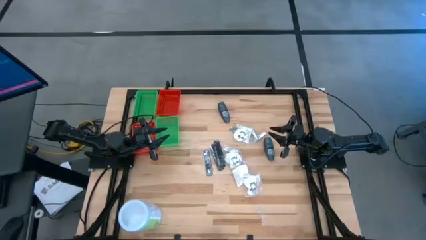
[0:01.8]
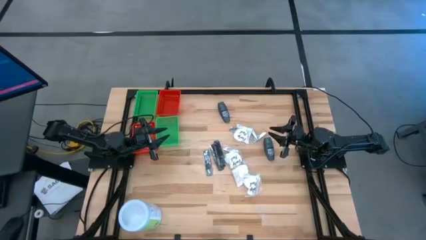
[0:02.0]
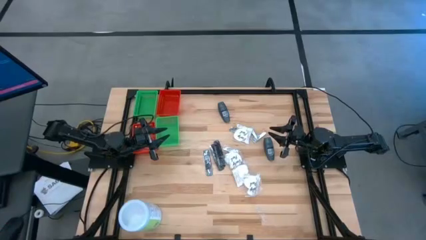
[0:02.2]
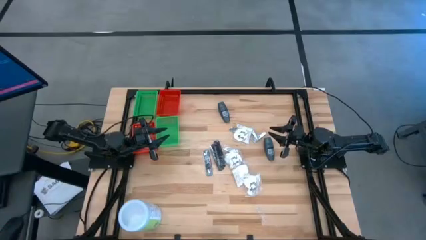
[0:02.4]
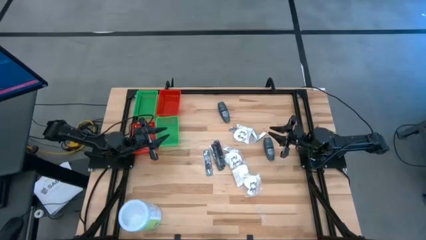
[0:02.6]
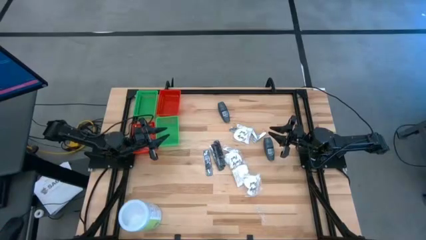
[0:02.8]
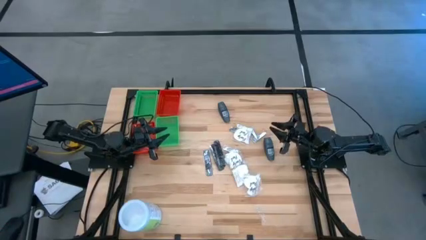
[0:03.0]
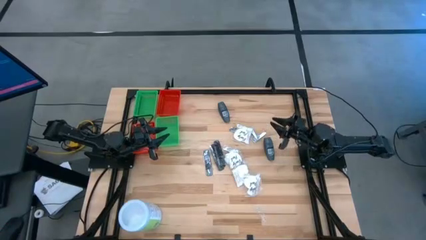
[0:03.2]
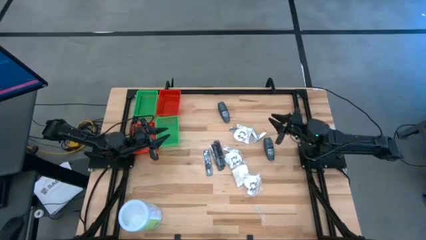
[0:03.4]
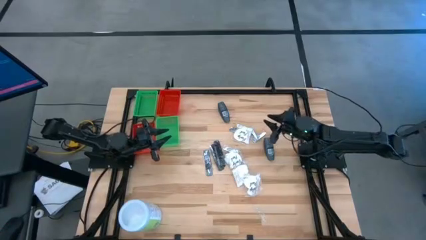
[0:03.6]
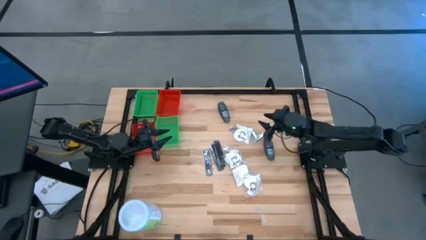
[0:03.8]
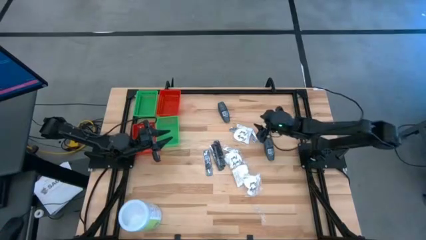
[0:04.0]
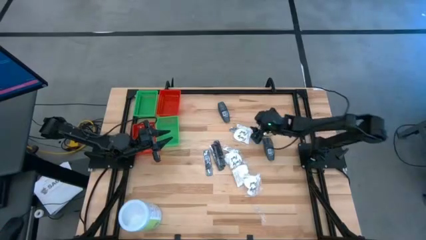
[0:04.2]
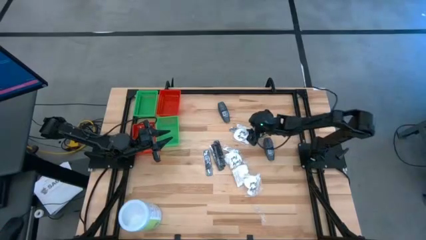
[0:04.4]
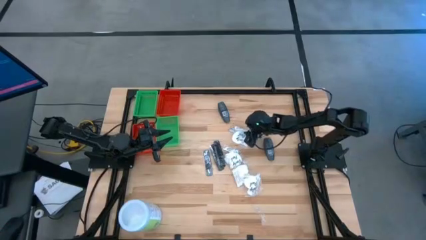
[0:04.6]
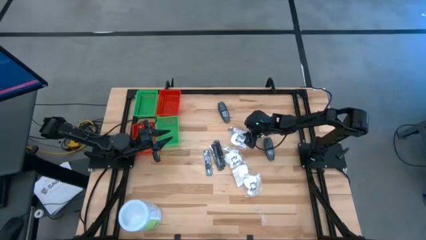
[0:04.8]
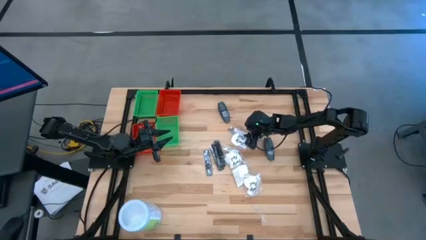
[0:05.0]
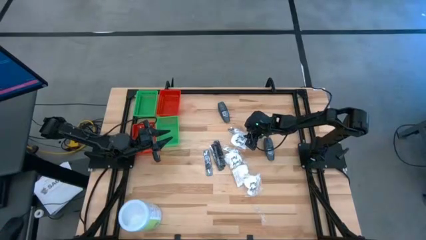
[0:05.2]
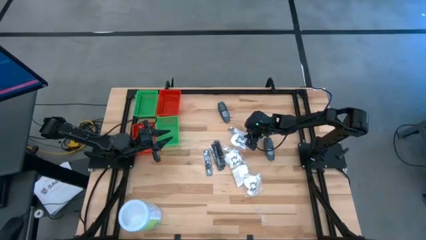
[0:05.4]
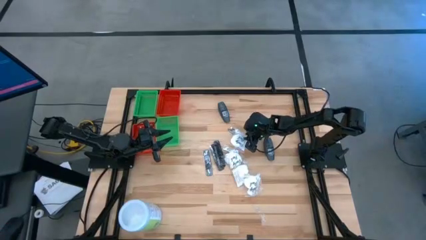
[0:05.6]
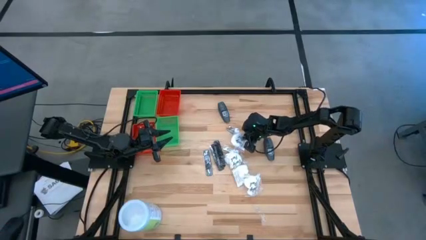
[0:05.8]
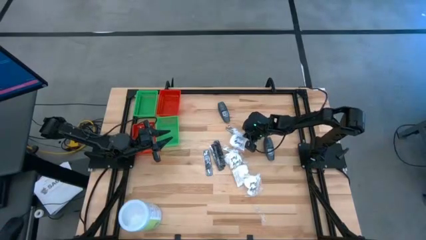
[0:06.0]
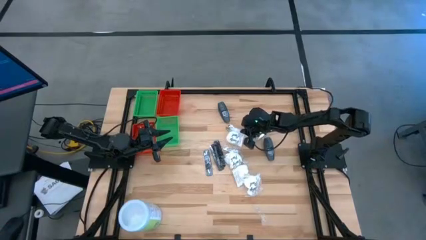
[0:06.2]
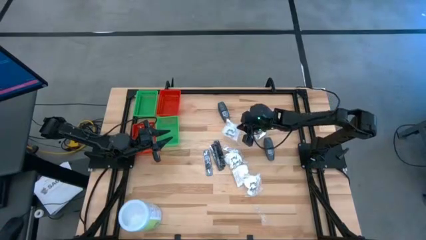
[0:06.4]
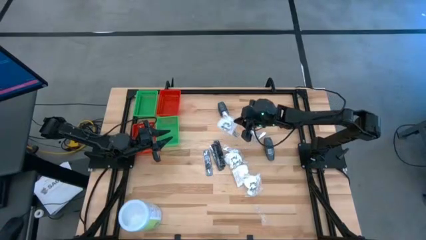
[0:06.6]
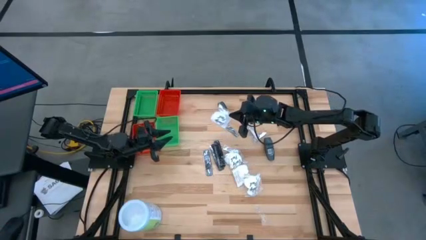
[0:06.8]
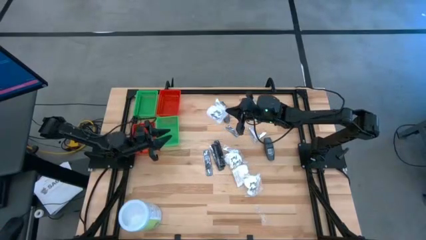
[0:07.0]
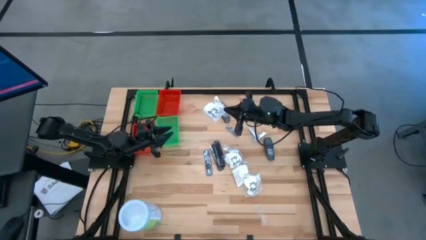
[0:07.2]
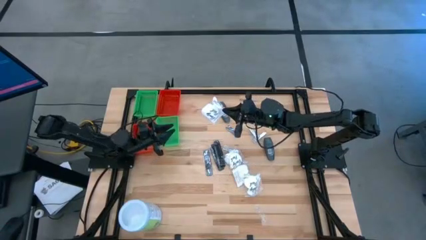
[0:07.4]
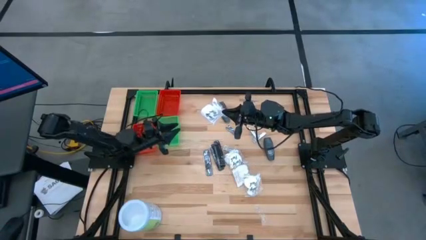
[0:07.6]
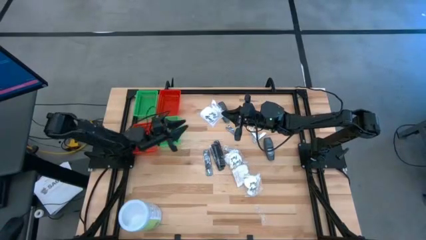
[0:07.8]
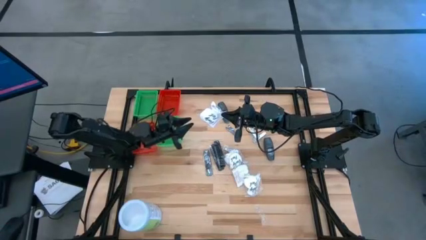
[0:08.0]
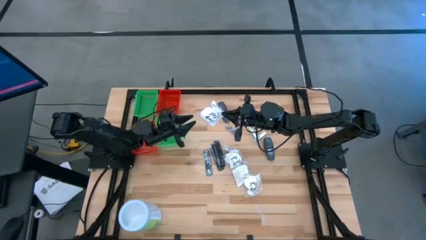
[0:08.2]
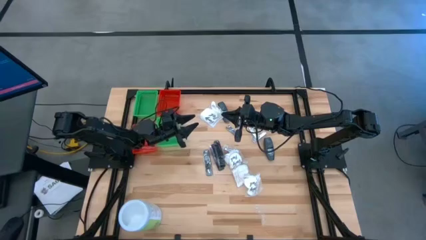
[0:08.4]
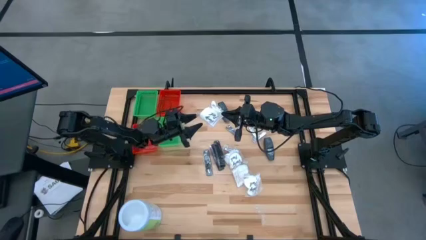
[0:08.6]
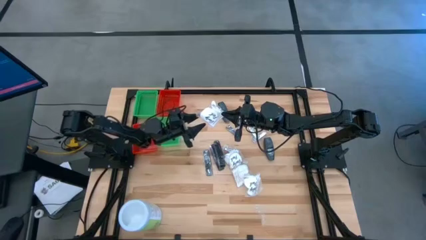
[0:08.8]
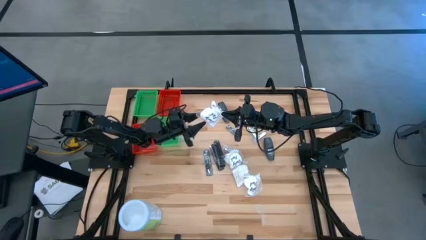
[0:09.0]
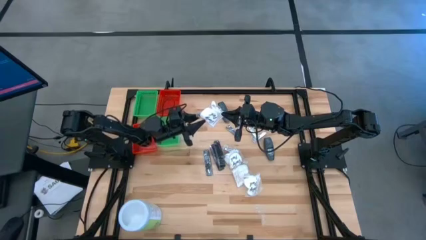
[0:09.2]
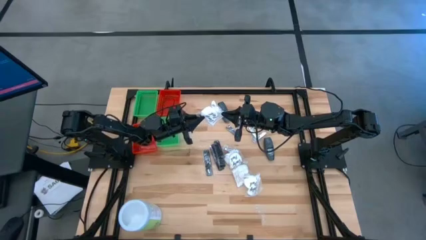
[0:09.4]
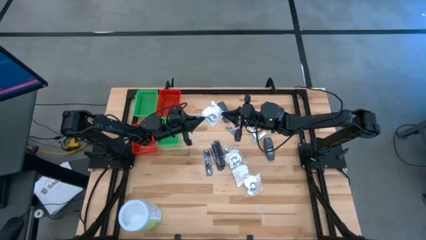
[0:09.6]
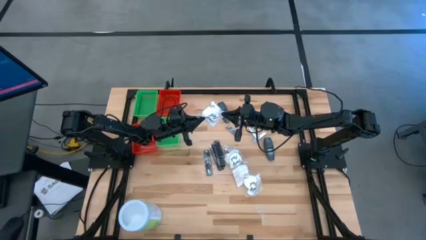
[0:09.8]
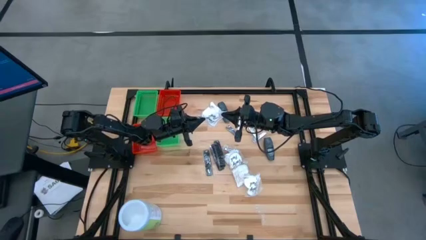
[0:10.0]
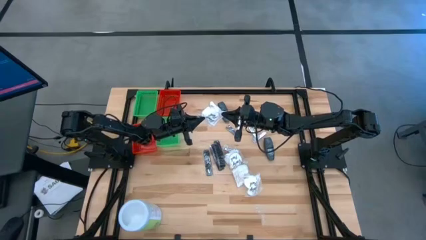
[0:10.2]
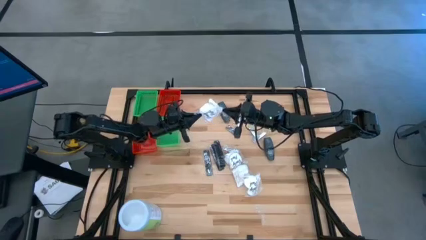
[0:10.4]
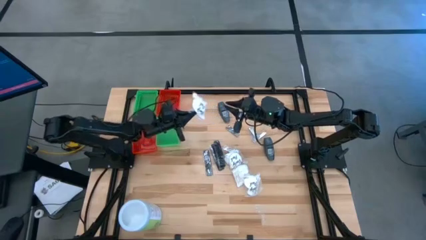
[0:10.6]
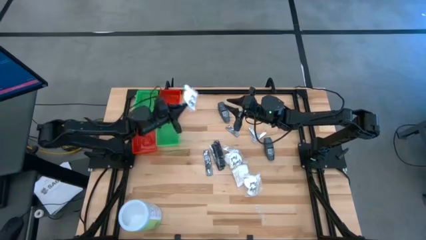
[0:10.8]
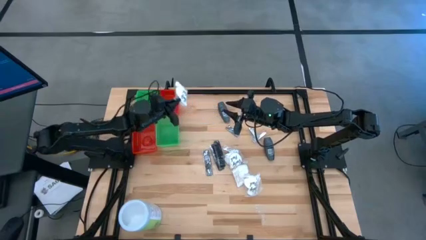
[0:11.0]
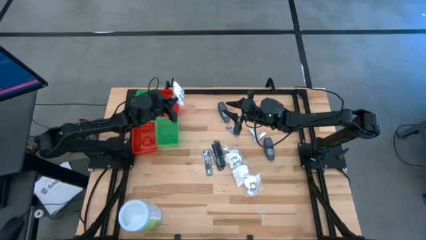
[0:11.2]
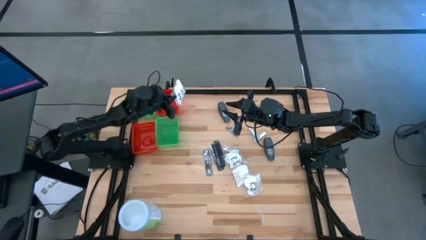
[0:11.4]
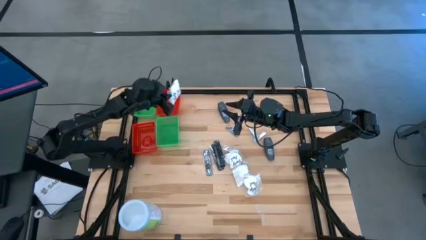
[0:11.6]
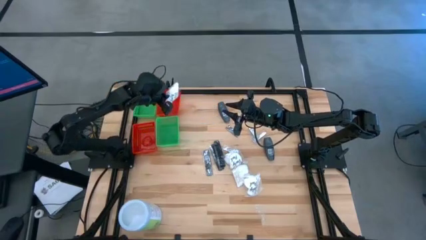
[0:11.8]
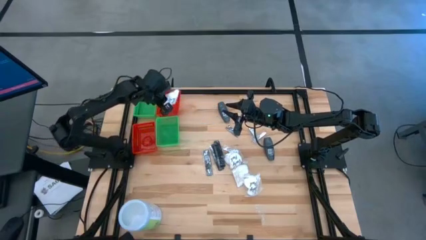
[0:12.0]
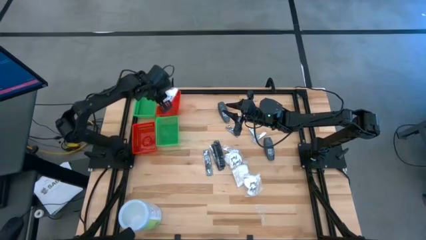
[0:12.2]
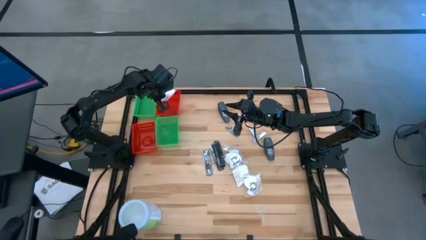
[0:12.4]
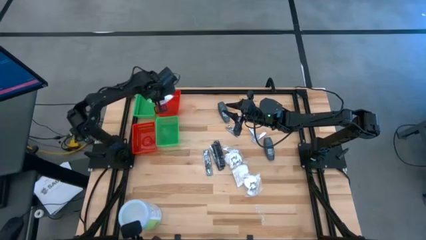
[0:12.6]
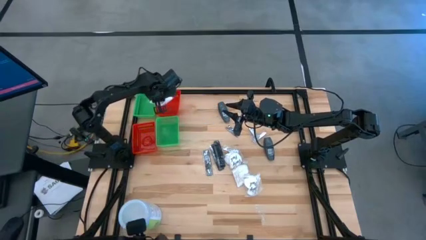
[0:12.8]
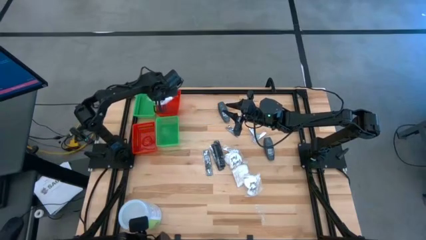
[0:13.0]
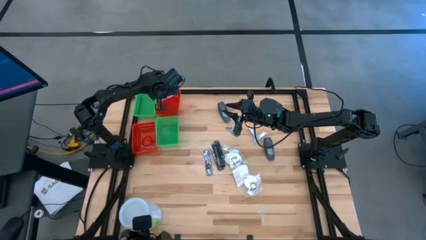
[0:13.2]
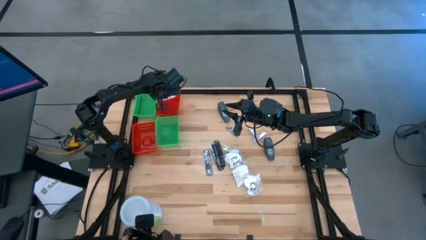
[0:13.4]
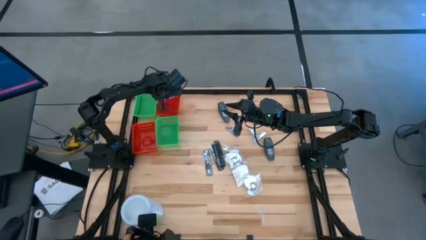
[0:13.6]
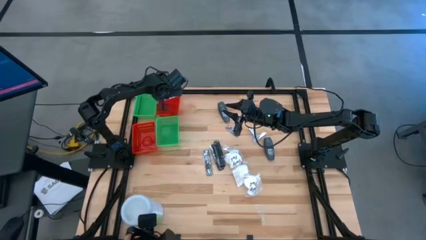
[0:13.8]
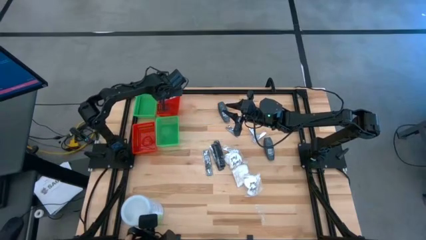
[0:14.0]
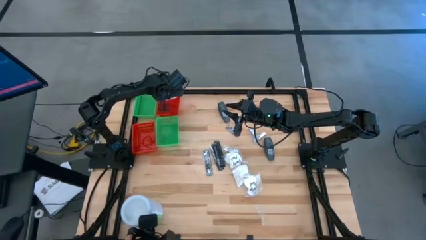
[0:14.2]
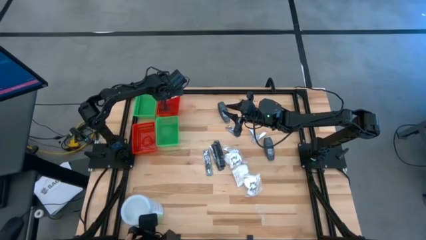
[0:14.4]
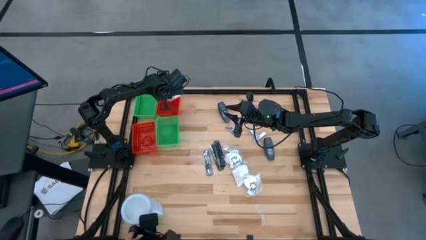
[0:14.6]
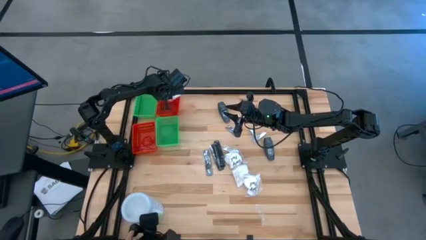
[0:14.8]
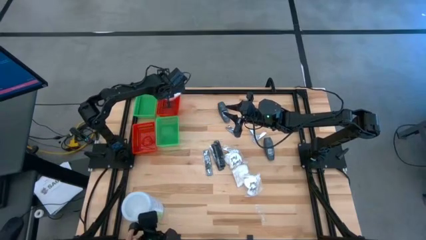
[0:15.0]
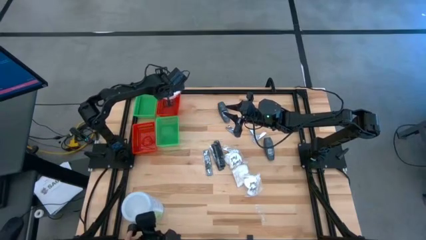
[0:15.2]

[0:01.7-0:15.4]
Task: Pick & Place Travel size toiletries
Put the white cotton pack into the top red bin
